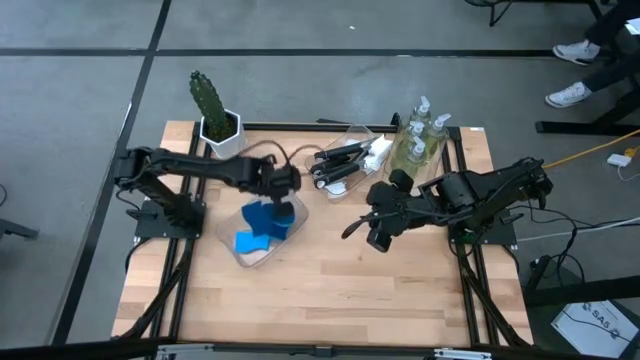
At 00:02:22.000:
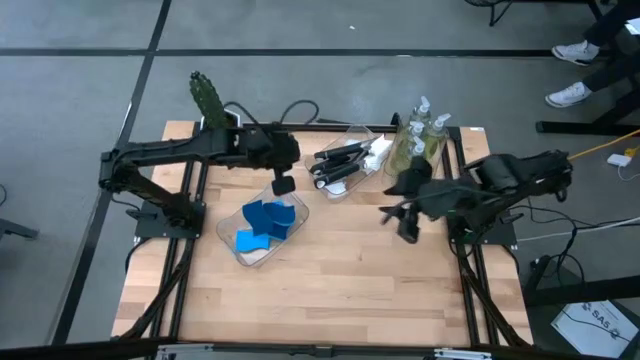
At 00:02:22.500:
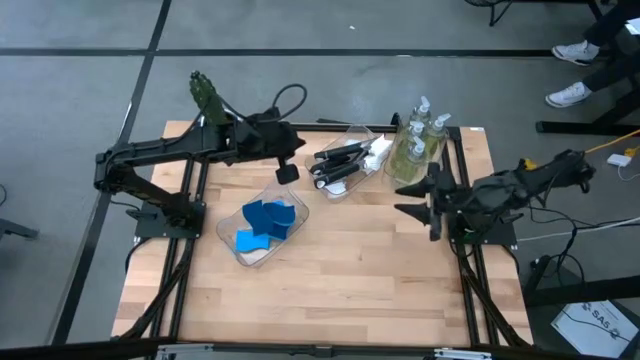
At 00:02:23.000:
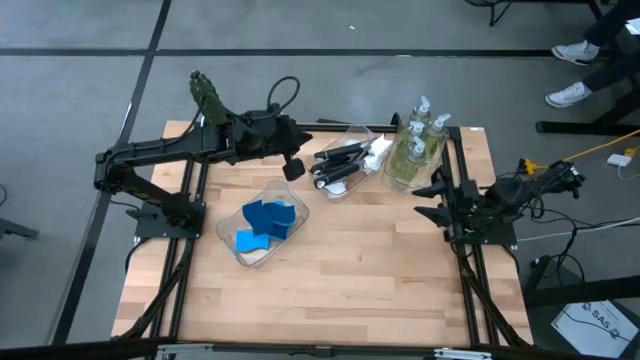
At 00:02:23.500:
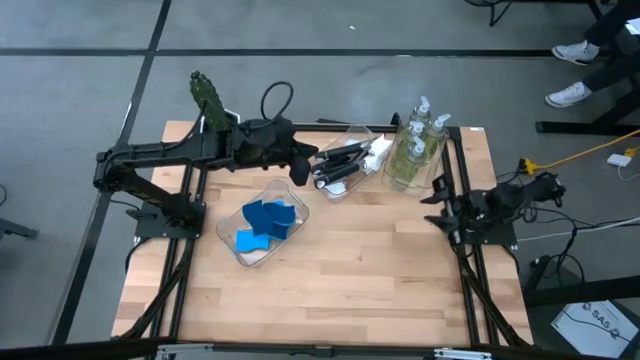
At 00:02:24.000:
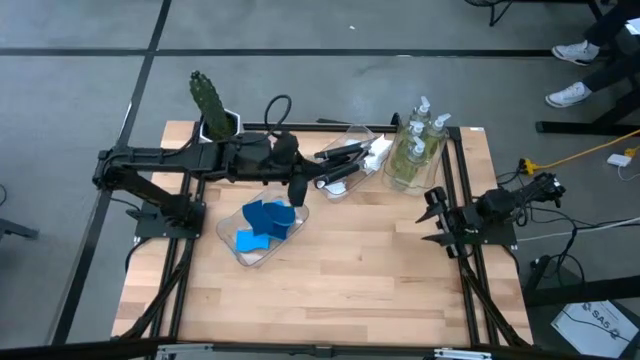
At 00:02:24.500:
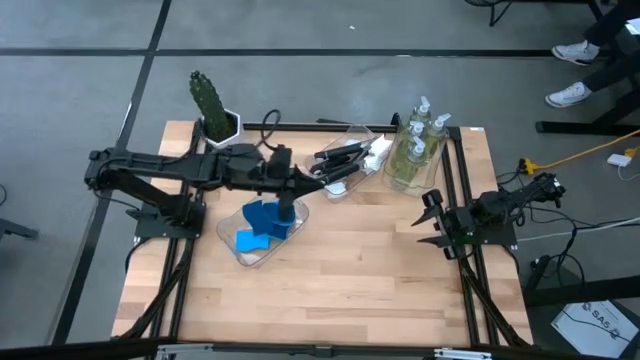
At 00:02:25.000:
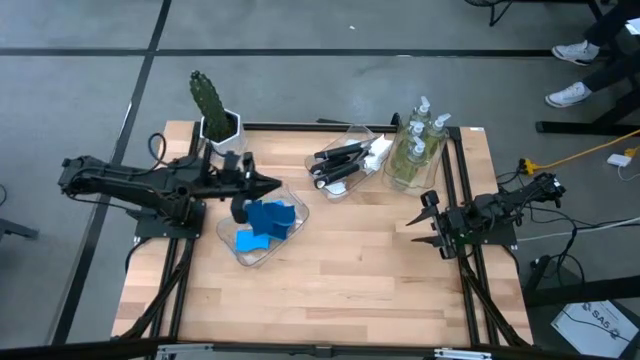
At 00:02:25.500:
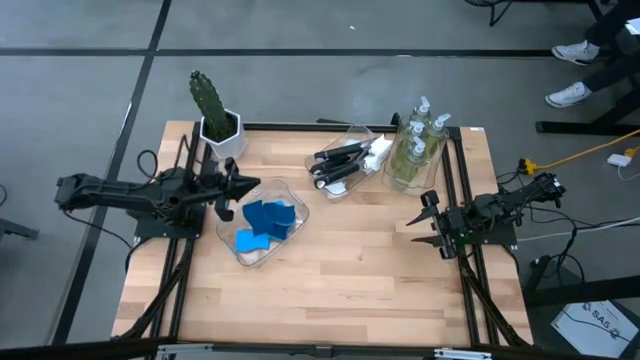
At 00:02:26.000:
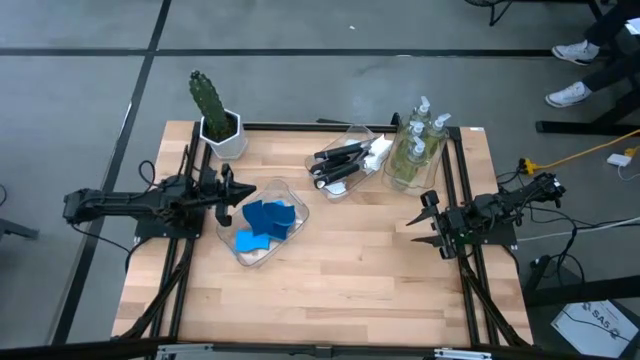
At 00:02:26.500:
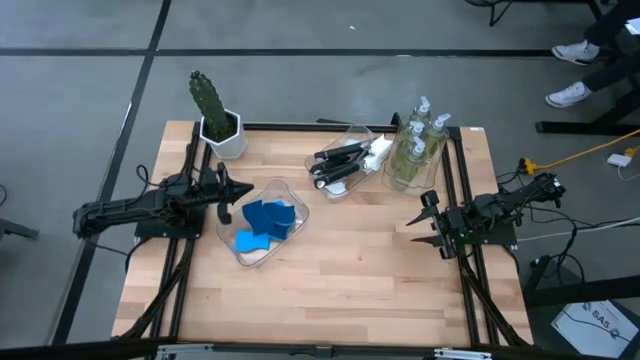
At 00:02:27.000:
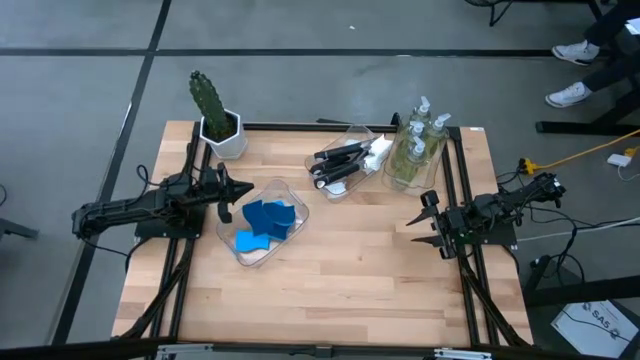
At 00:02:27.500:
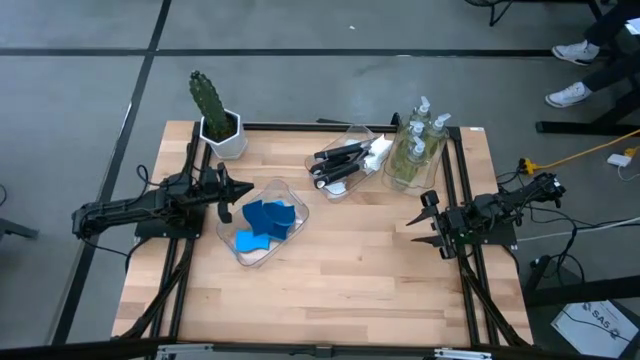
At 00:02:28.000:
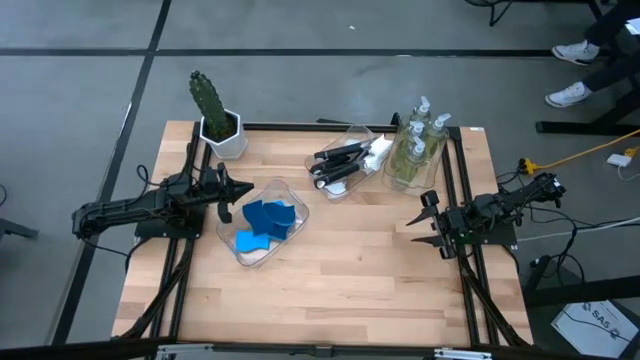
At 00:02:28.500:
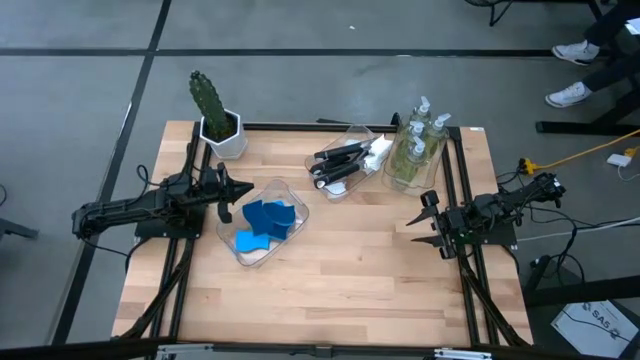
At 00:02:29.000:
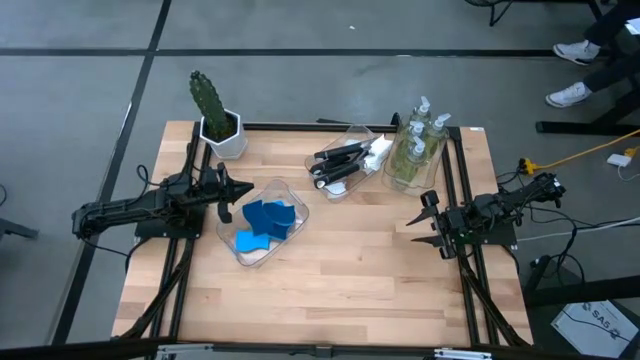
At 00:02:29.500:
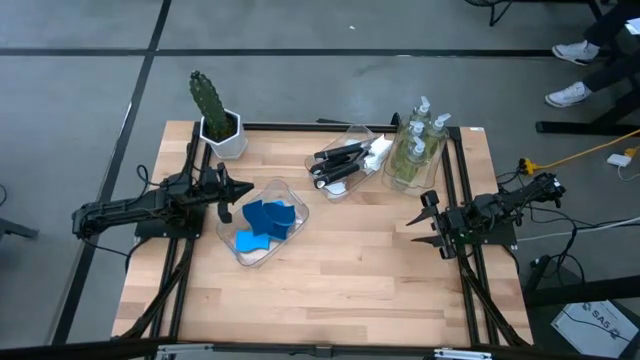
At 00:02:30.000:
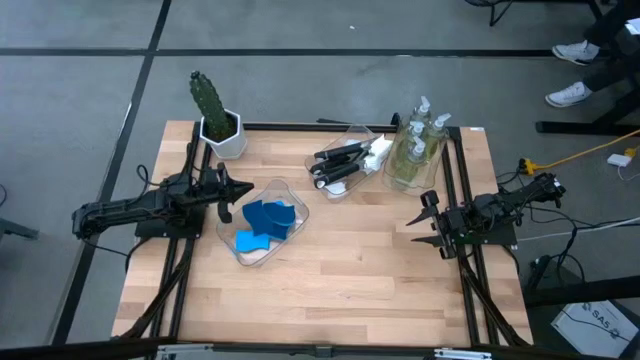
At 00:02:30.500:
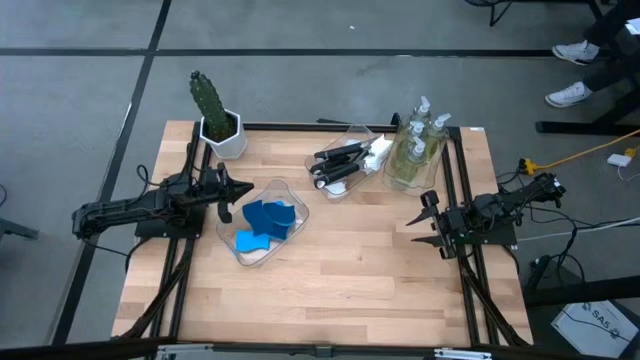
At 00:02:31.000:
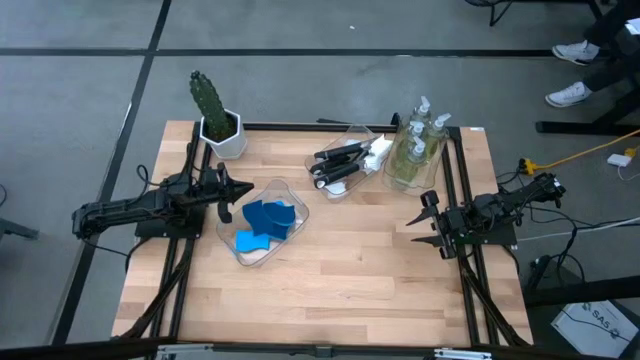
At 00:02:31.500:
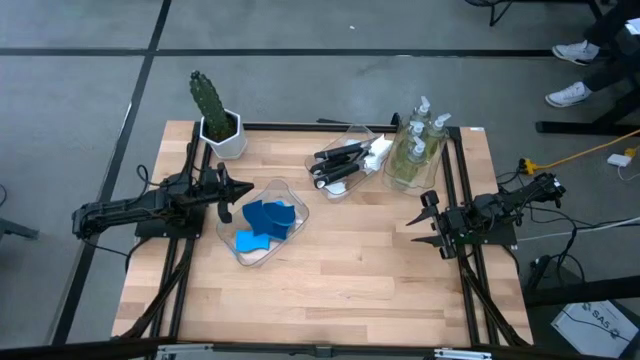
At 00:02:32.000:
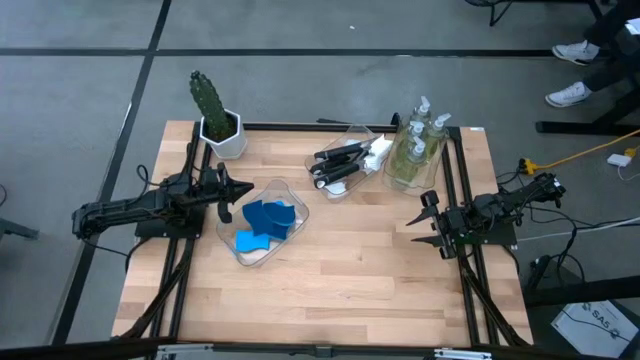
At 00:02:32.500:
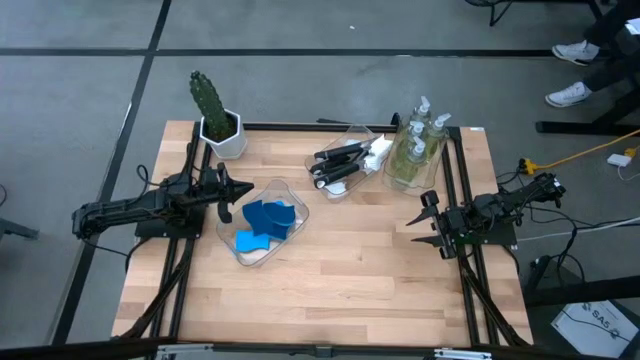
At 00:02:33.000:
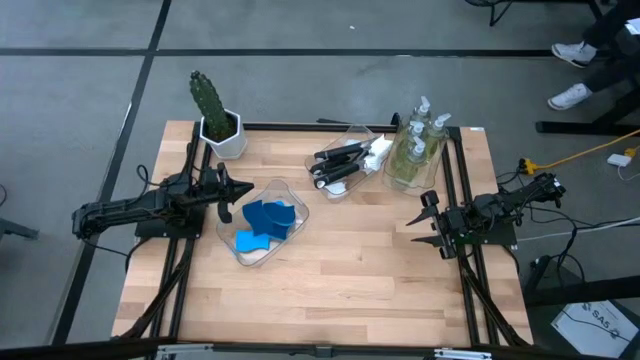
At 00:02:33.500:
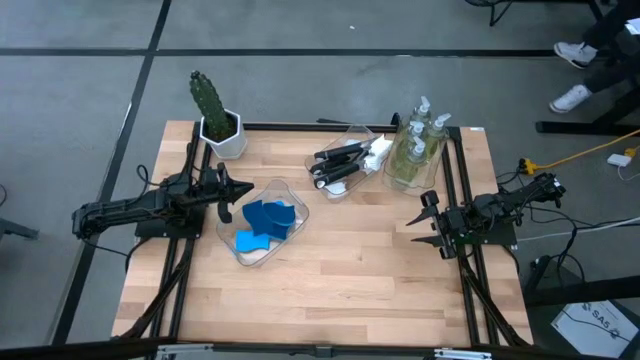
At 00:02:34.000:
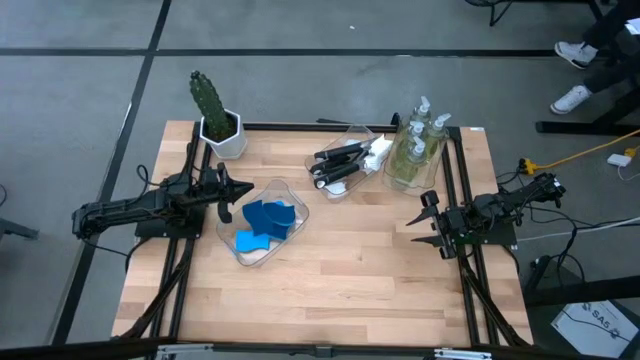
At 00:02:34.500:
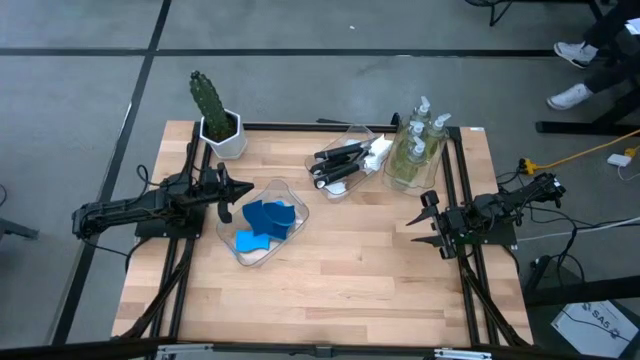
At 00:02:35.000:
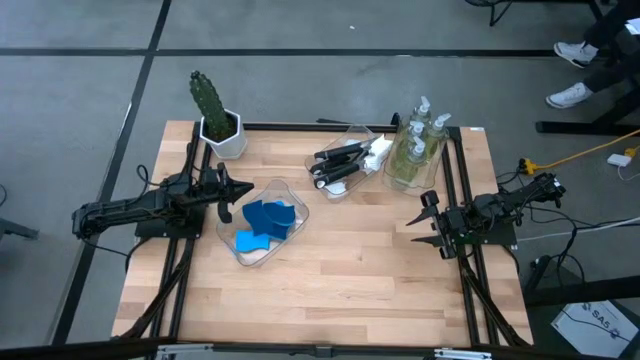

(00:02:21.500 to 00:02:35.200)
Task: Pick & Place Kitchen Sink Supplies
Return to Home Position
